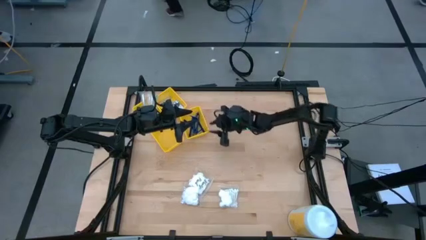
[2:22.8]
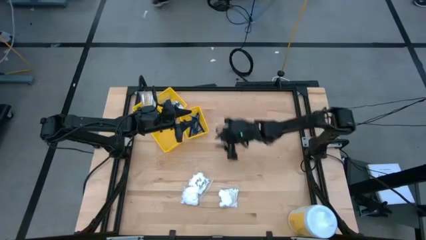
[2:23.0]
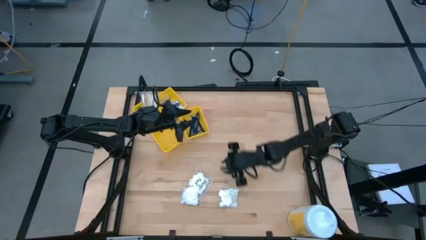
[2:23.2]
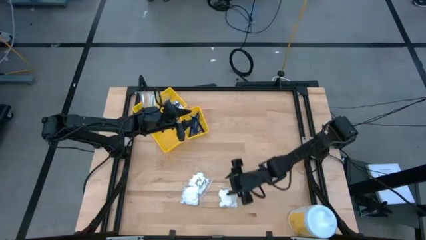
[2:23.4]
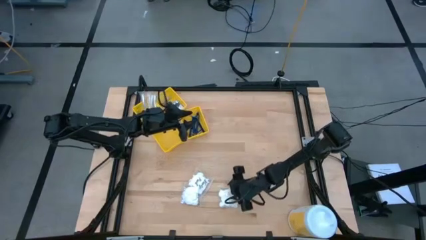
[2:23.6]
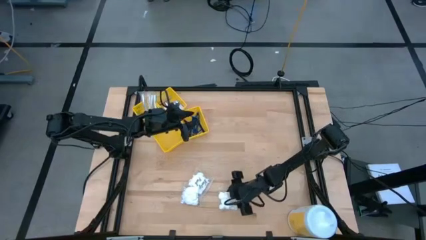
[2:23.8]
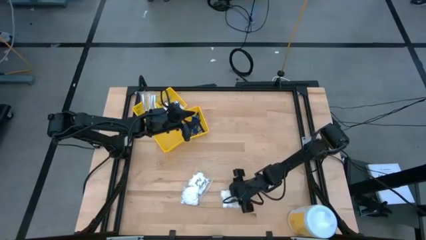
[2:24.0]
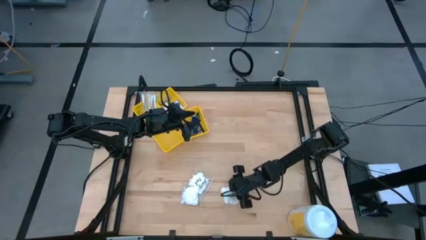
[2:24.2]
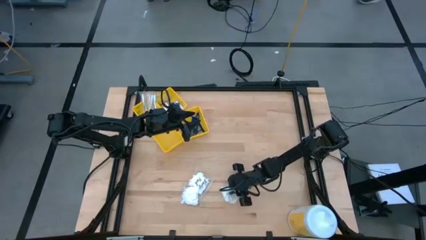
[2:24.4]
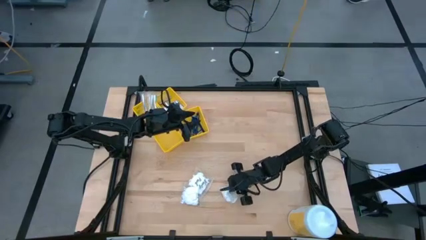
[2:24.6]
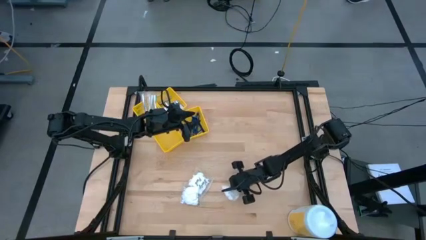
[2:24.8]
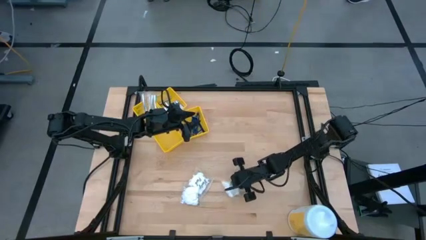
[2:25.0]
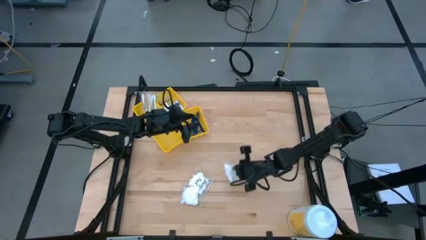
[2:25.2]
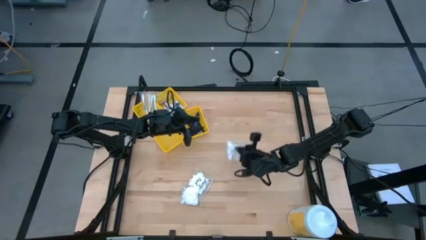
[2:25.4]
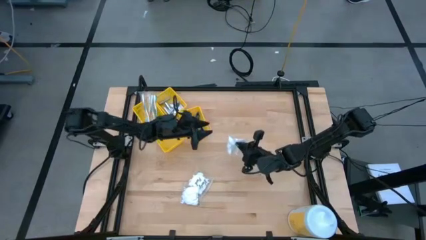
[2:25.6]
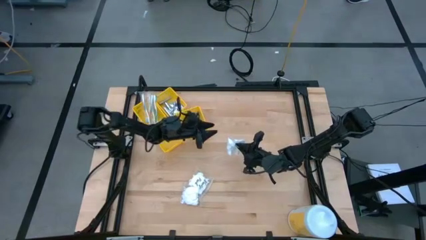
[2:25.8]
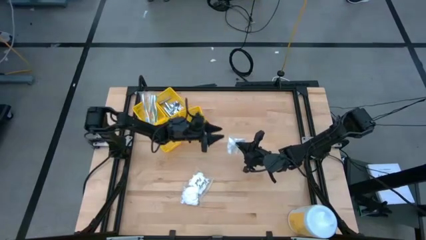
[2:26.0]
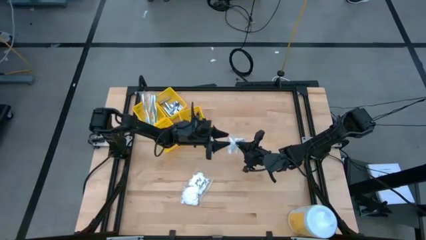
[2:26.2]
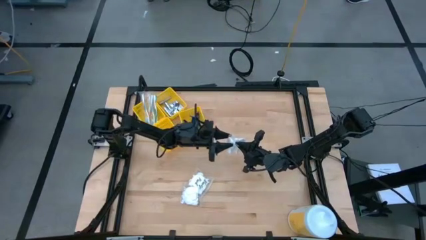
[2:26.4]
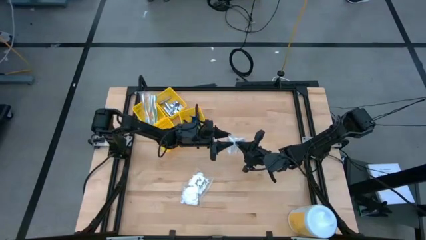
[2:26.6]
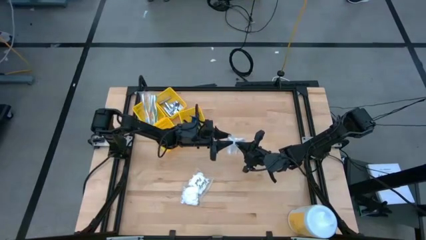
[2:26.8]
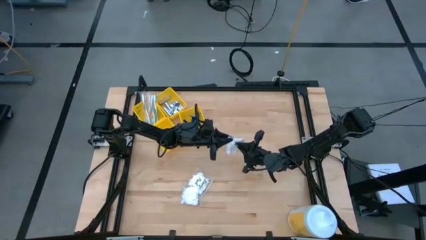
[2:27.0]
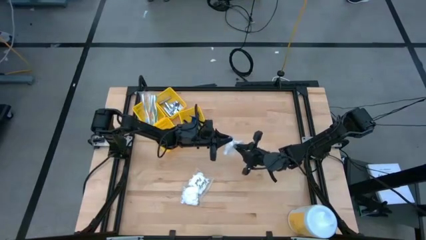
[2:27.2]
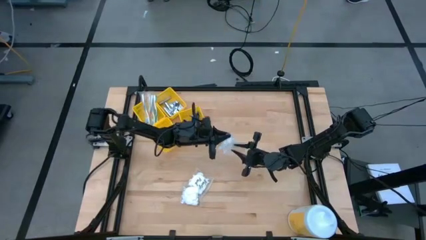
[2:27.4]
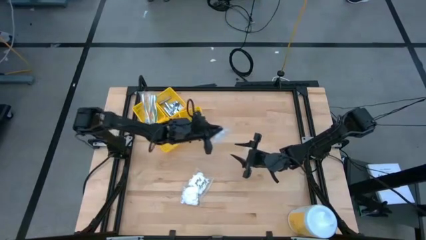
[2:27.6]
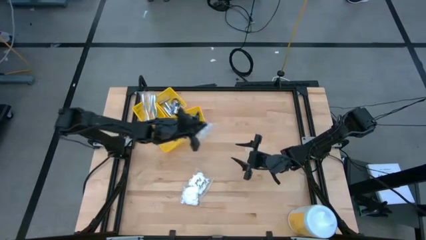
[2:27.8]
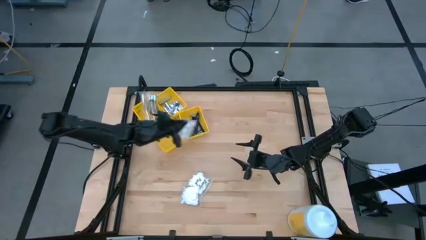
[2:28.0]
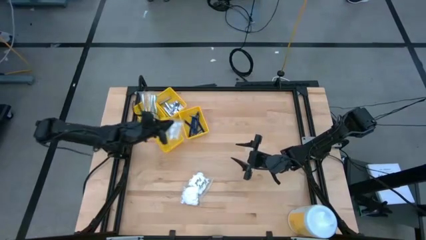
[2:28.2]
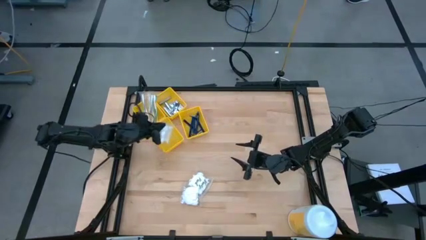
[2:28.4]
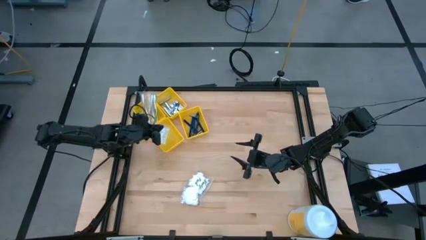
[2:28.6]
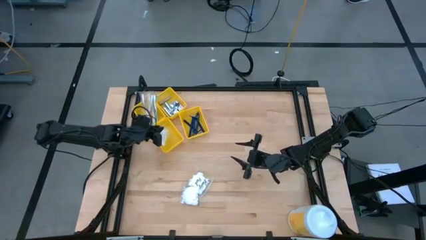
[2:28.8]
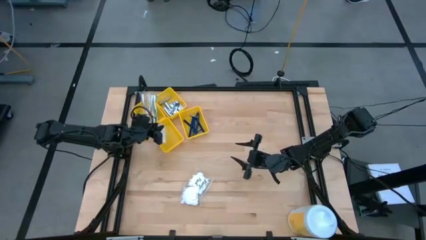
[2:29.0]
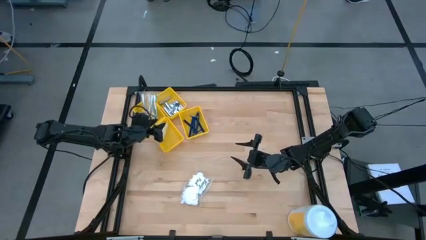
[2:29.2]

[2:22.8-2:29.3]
Task: Pick & Place Travel size toiletries
Put the cotton pack into the bottom yellow bin

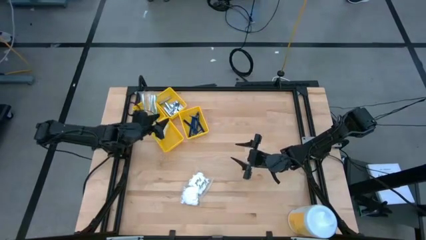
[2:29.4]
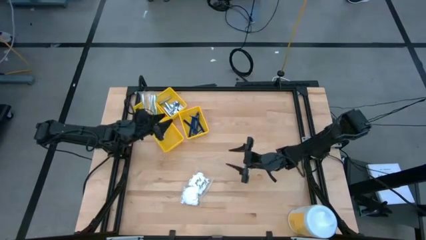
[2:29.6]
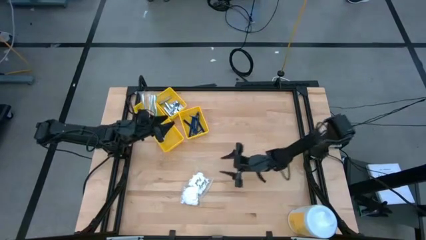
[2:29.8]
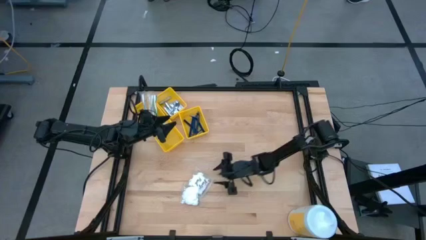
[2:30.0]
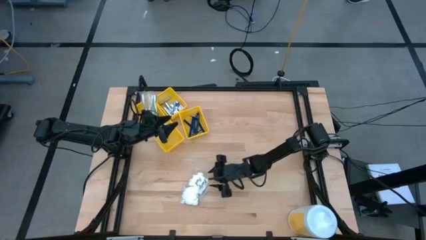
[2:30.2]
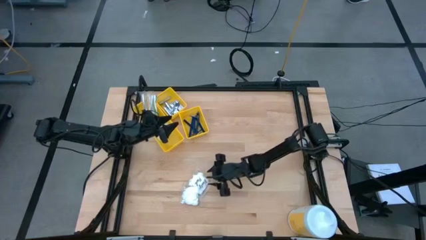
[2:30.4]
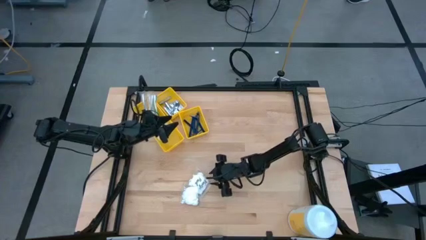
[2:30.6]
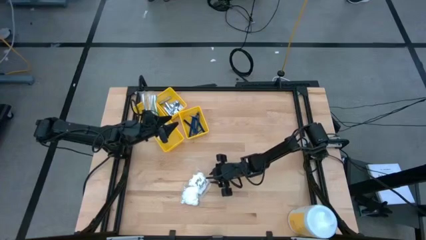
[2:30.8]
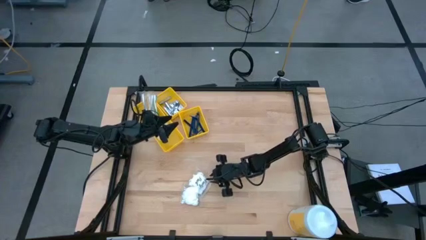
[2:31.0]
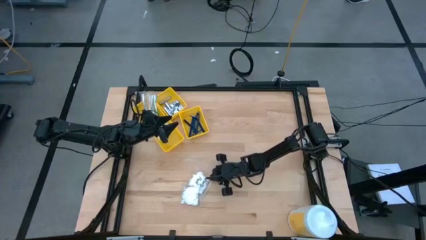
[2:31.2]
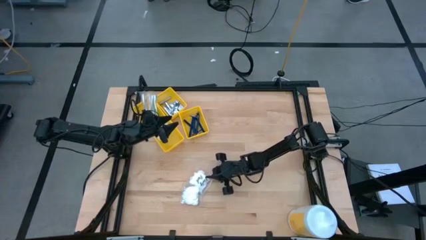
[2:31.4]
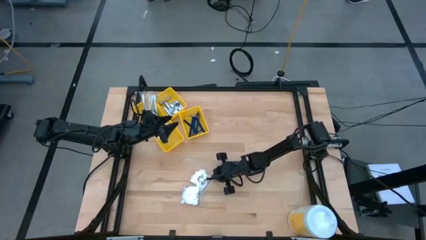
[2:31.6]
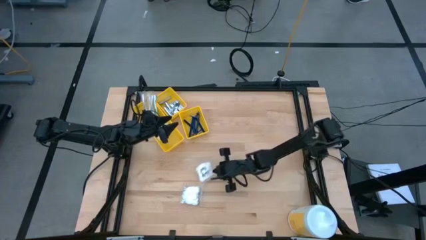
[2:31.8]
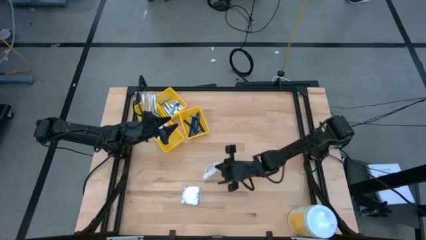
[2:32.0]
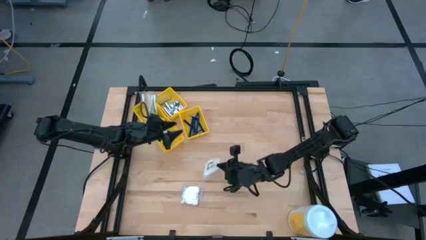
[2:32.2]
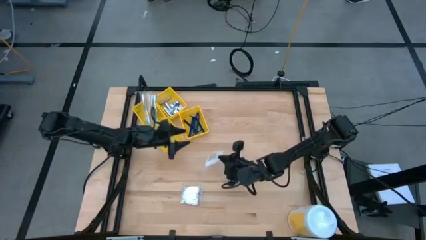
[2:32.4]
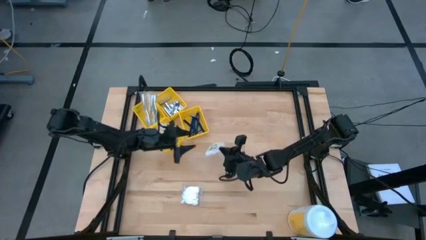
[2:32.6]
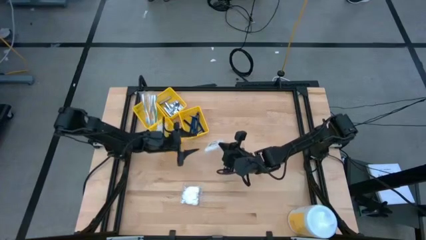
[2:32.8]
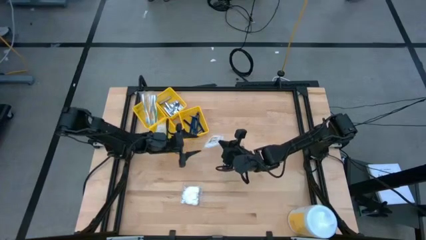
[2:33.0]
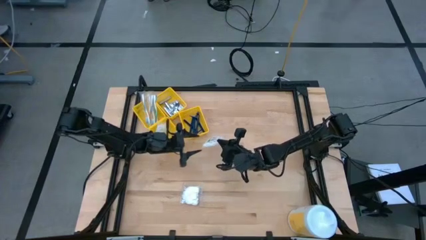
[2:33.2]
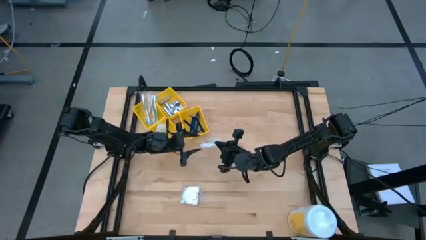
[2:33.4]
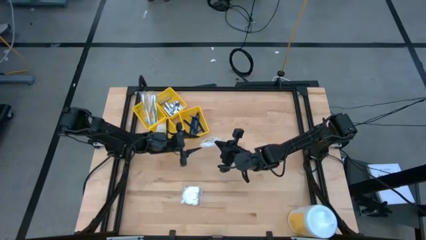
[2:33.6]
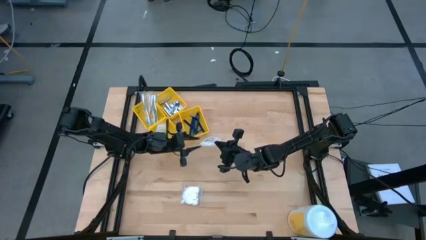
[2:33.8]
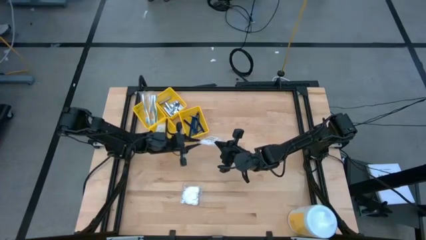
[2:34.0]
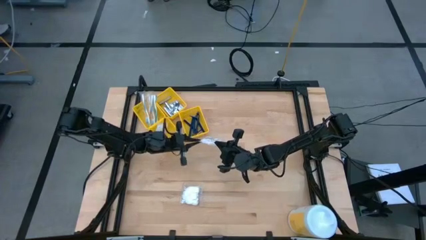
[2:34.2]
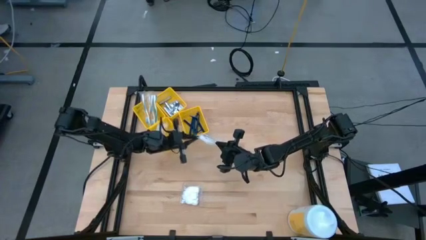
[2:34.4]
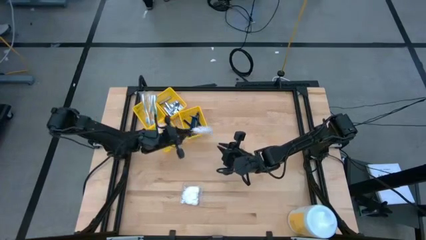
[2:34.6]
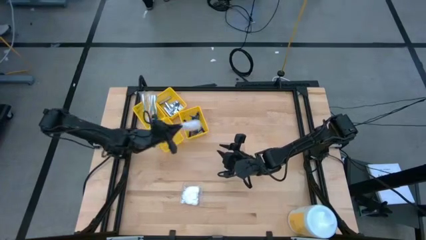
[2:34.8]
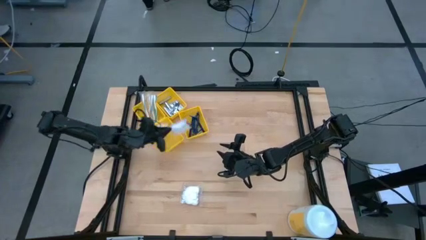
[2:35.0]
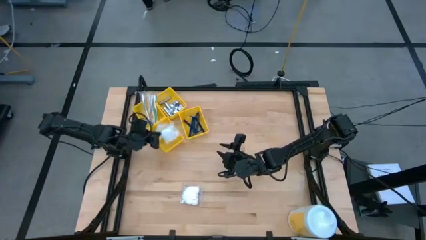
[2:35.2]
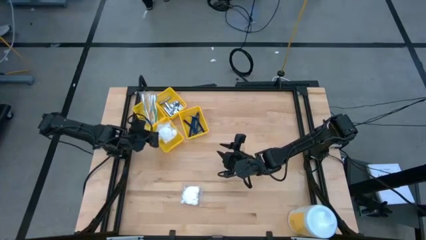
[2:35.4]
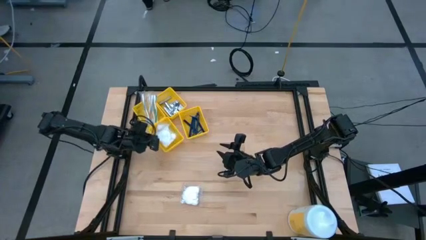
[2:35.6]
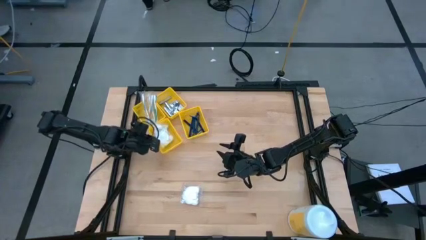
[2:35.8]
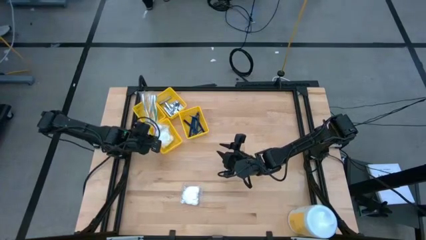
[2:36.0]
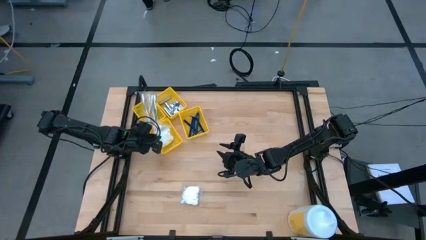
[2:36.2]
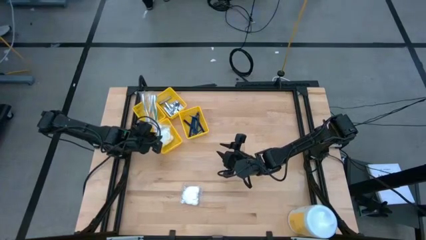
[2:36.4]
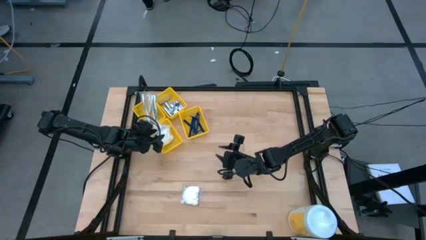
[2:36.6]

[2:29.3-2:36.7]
Put the cotton pack into the bottom yellow bin

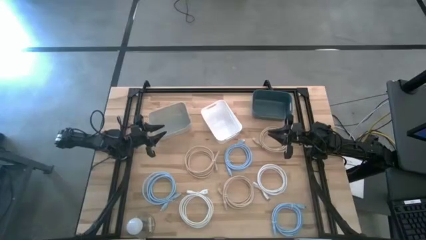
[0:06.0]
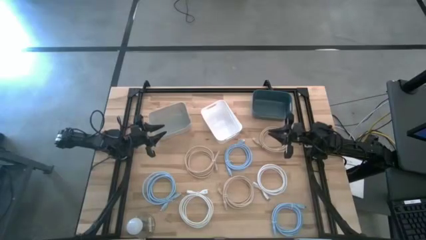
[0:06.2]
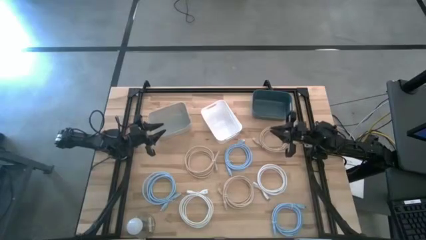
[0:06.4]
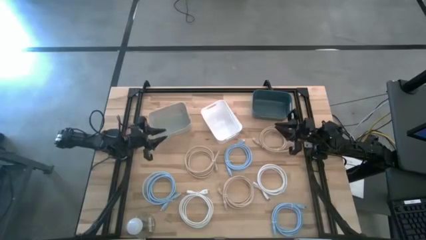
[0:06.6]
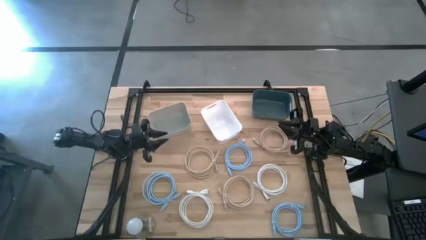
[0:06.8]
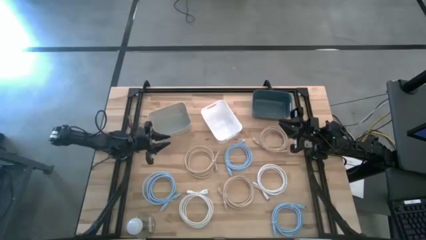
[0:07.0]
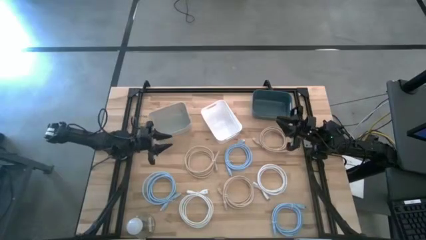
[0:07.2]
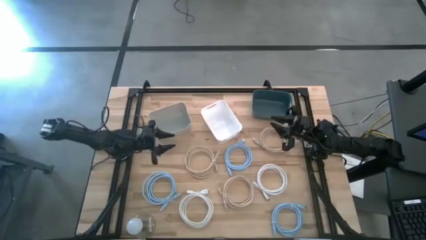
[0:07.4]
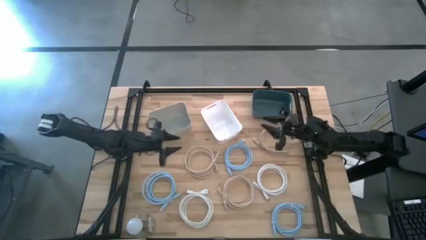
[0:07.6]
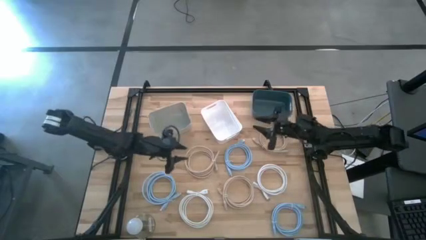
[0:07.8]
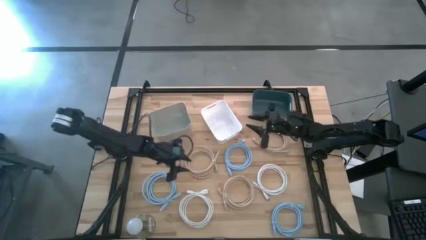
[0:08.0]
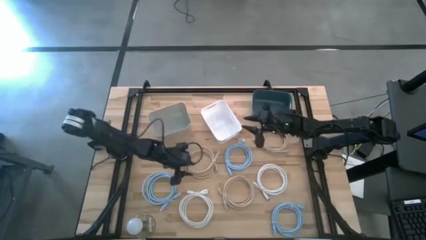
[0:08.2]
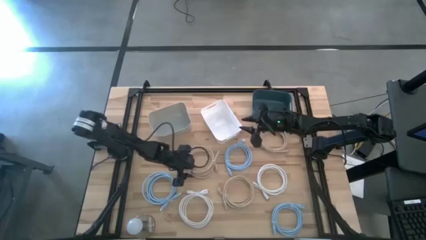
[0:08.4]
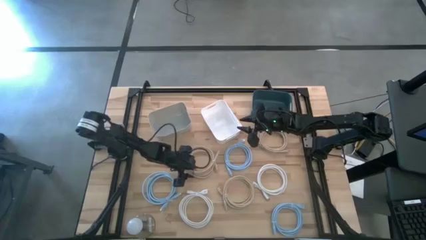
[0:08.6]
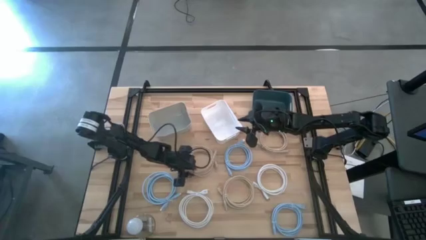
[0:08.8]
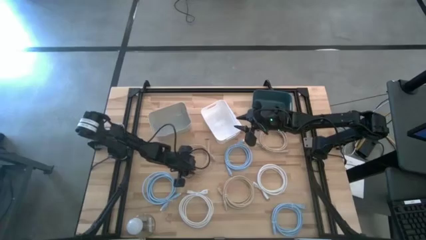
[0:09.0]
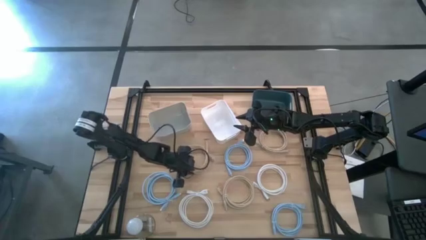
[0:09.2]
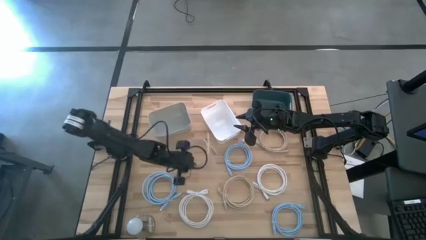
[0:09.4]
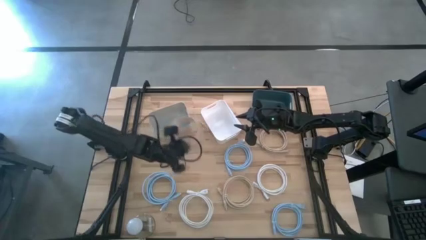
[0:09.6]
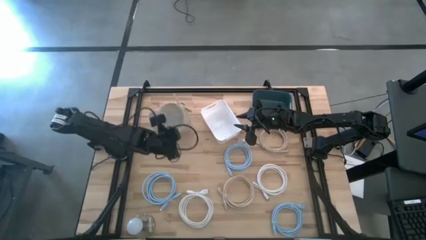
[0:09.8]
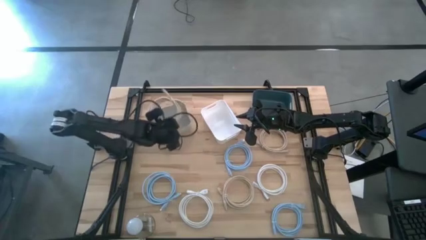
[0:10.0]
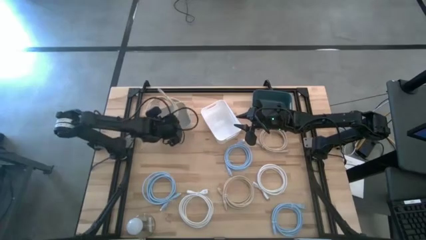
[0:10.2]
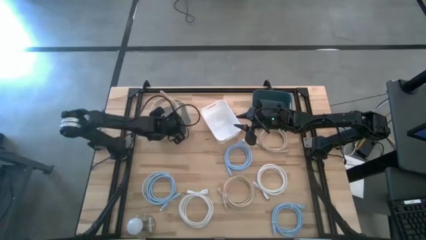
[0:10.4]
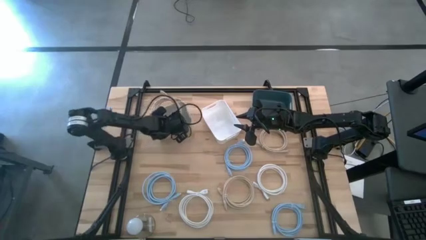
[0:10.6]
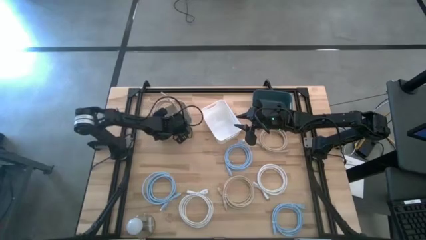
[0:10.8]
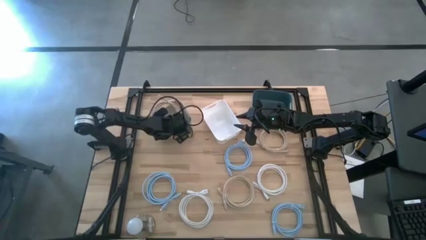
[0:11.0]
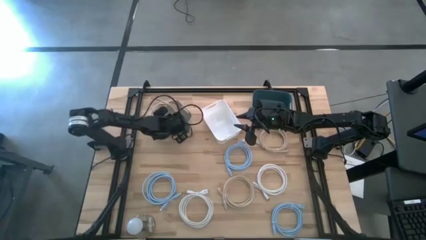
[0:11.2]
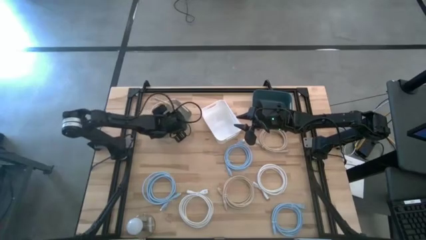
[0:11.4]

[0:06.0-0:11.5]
Task: Sort HDMI cables
Put the middle light brown hdmi cable into the gray bin
